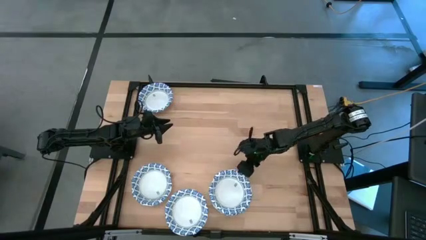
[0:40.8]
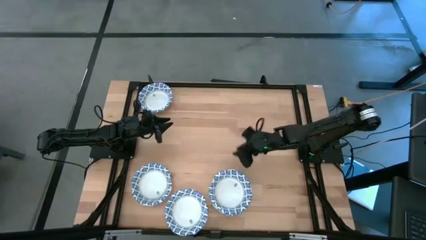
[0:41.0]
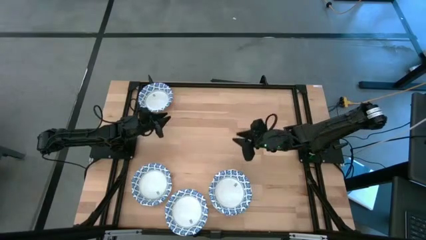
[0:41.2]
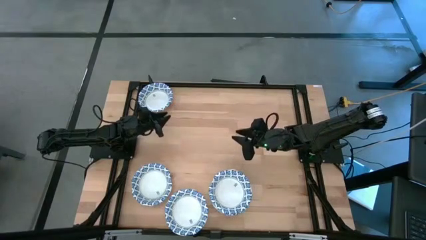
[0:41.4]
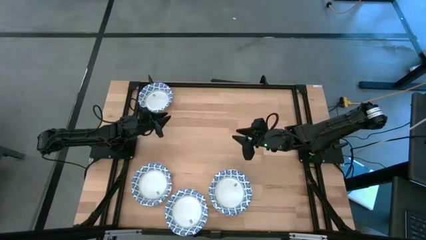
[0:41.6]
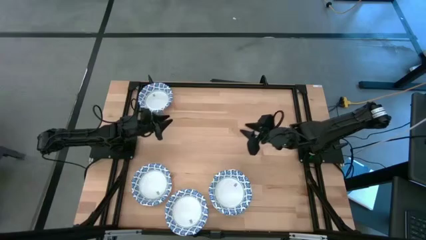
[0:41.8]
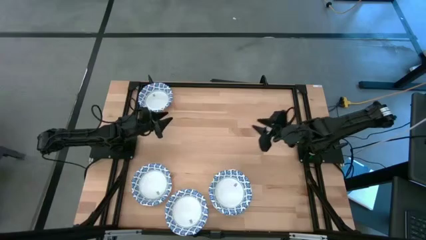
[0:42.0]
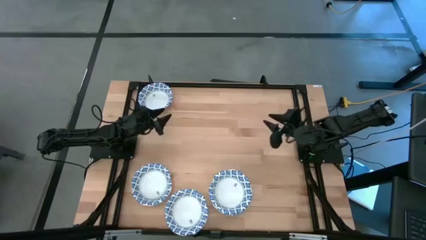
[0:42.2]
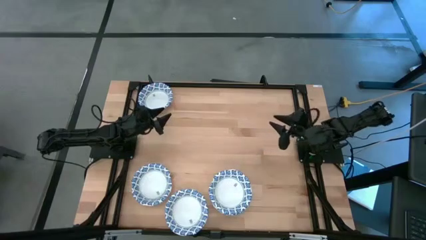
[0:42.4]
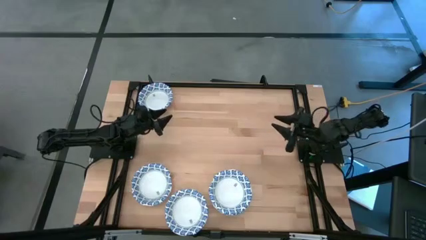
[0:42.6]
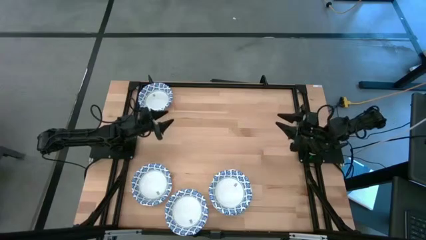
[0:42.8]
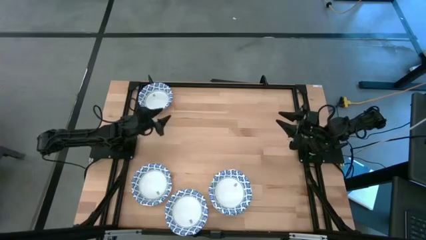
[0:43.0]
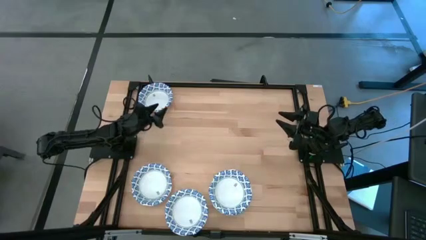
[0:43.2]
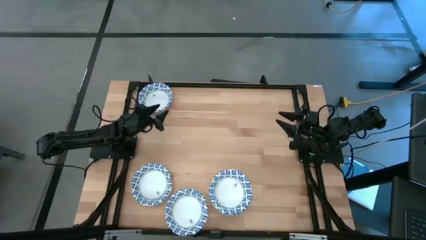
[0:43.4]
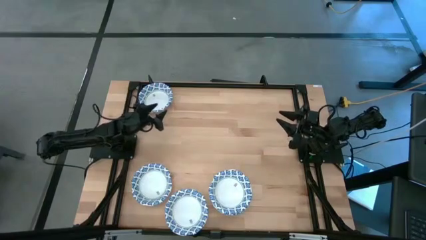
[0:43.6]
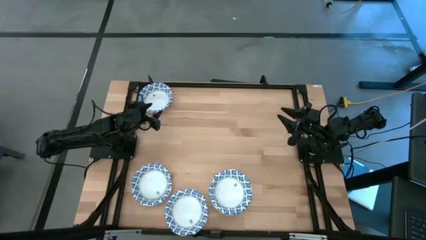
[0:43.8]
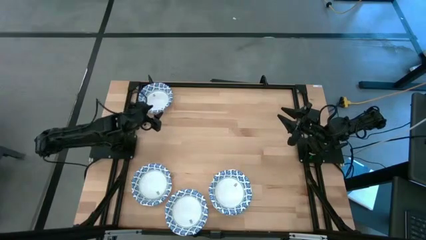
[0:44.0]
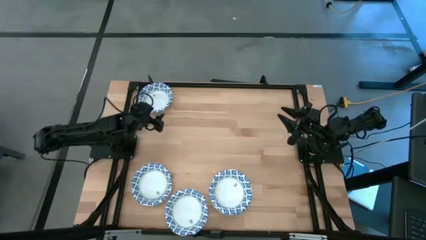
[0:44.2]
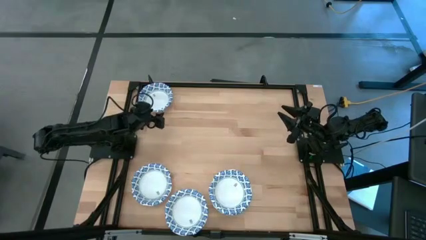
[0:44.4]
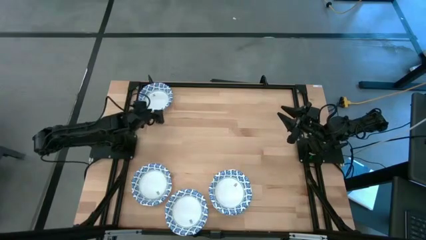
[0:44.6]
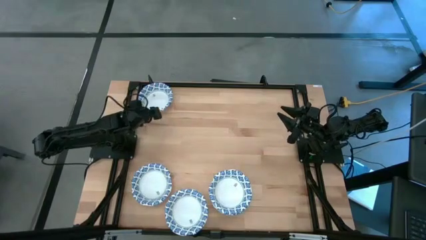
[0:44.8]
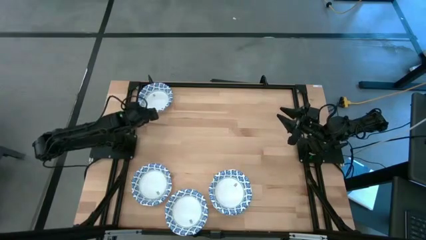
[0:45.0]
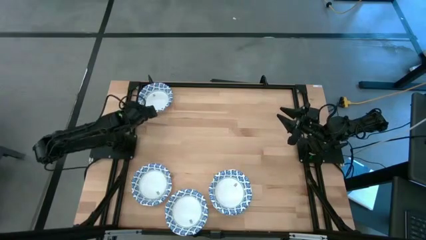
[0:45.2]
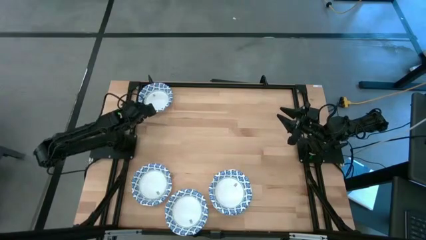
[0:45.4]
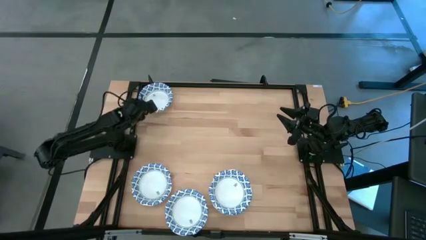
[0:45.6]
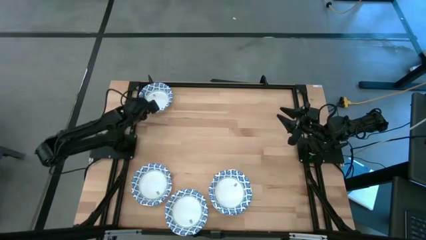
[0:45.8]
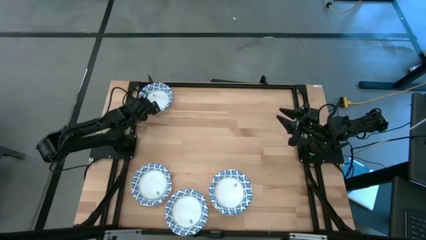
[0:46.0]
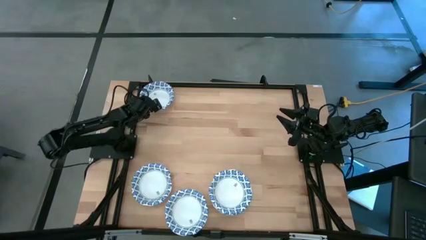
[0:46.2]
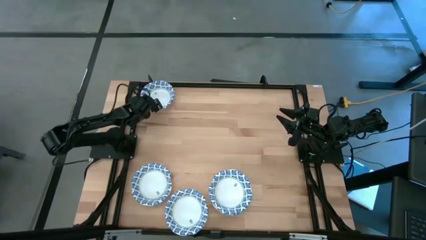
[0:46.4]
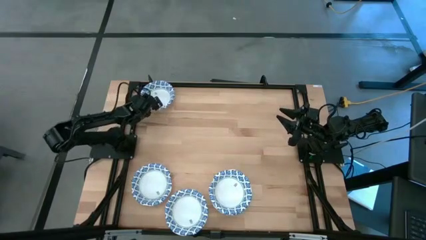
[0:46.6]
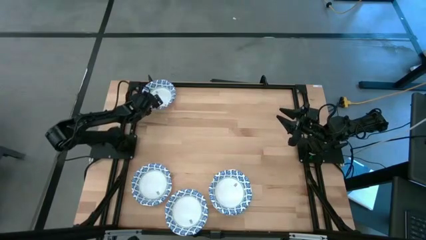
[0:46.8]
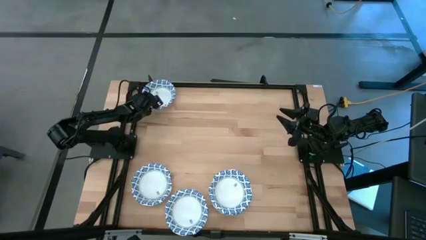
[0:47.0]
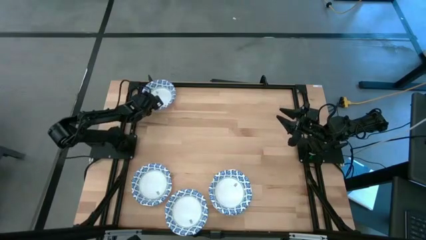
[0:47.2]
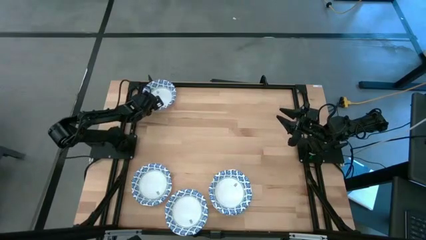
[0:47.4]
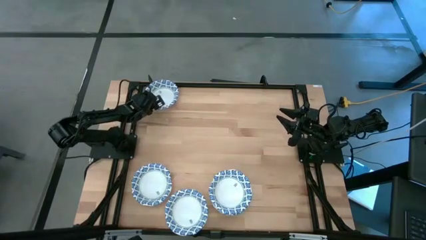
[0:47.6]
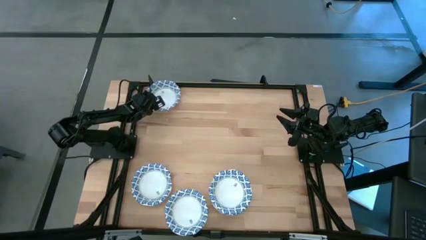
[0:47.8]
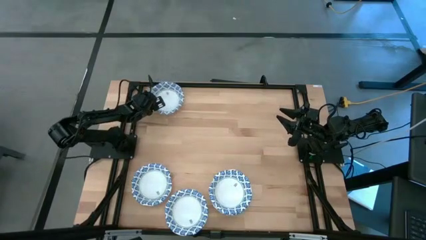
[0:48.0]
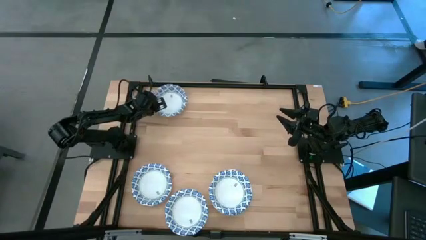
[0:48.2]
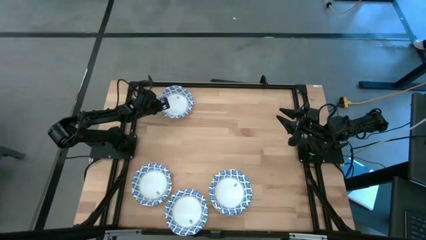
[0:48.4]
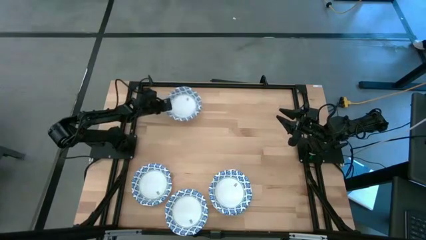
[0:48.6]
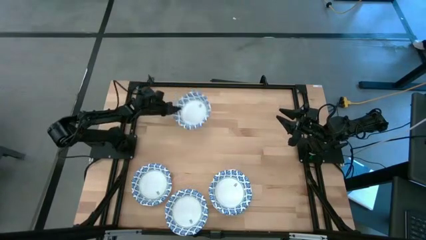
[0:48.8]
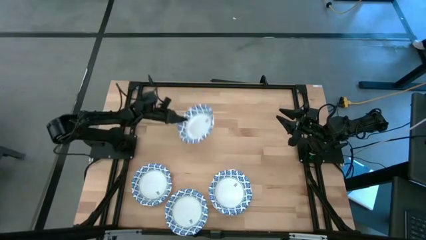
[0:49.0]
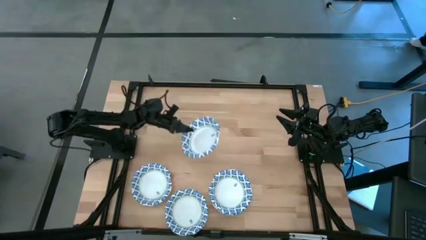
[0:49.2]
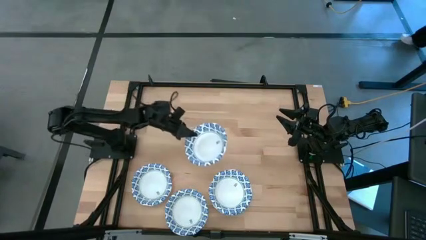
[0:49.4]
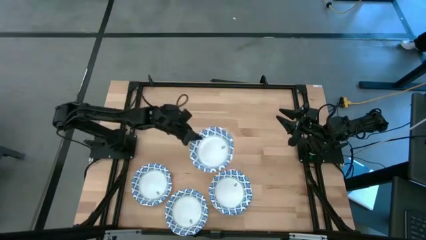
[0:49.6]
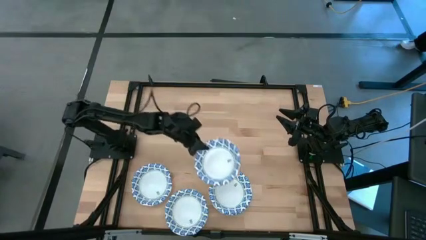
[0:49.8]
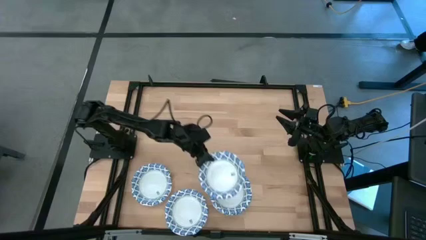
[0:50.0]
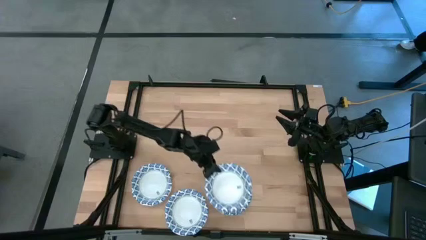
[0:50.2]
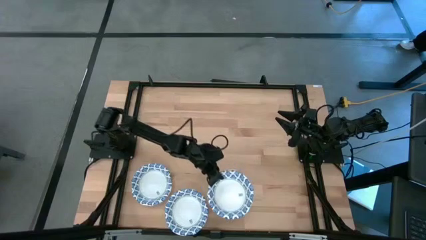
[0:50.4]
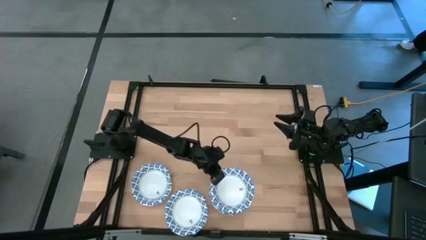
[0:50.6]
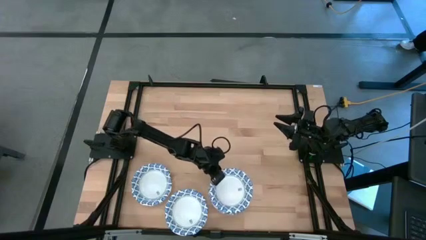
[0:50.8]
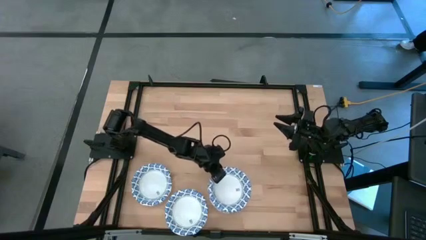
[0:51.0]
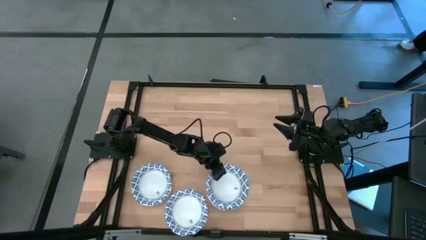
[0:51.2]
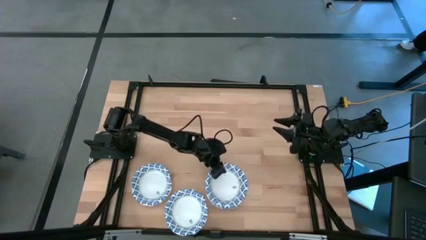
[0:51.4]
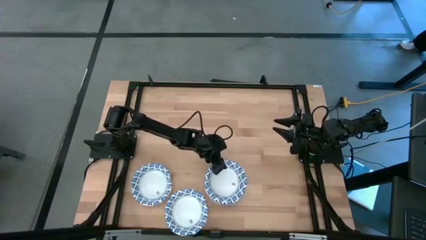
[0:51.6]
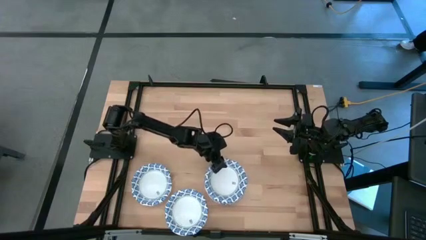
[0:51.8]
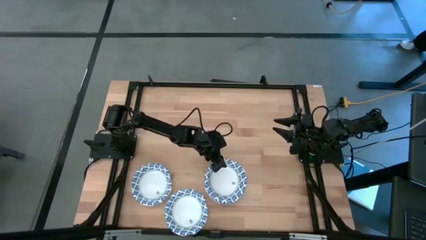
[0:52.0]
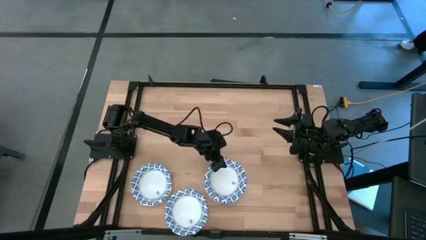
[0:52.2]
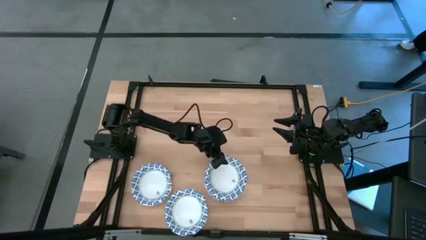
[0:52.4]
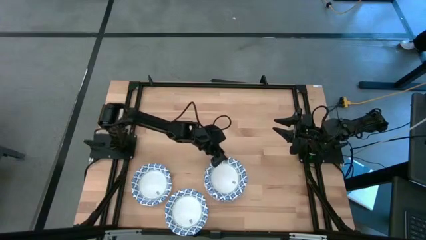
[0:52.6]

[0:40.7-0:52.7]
Task: Nest bowls inside each other
Stack the blue patterned bowl on the blue patterned bowls

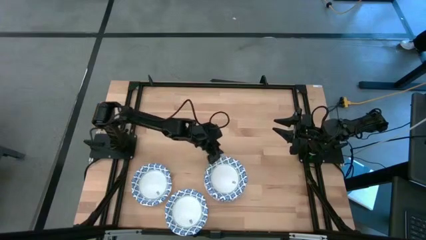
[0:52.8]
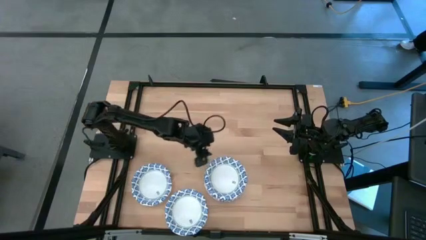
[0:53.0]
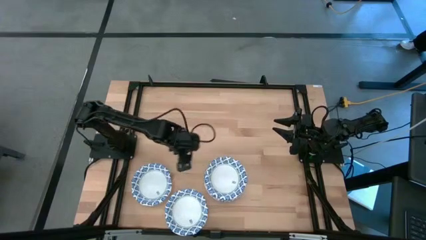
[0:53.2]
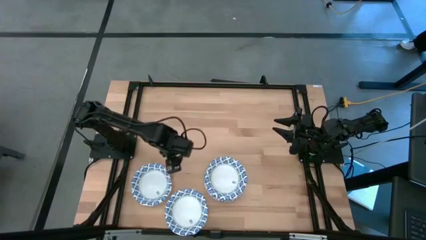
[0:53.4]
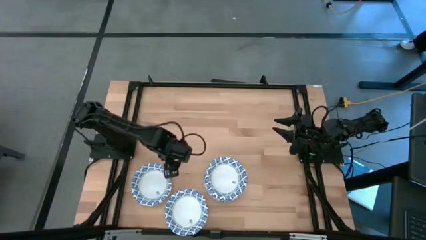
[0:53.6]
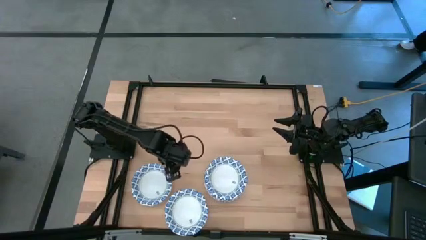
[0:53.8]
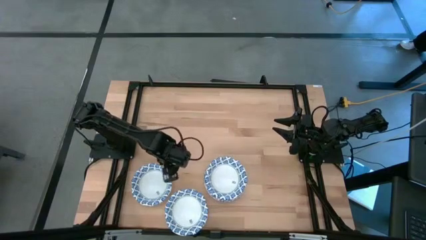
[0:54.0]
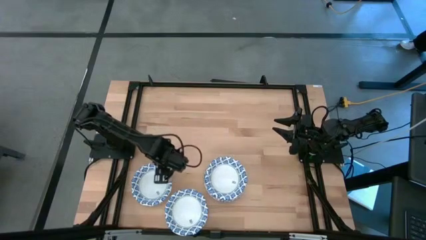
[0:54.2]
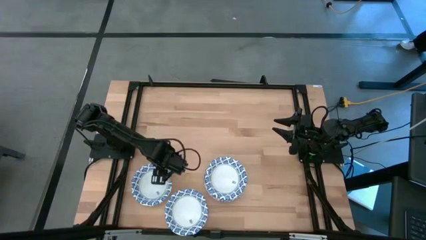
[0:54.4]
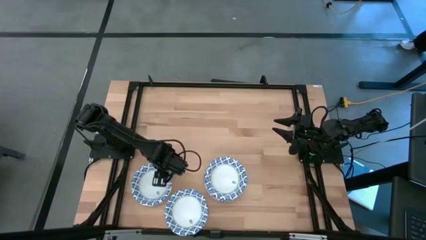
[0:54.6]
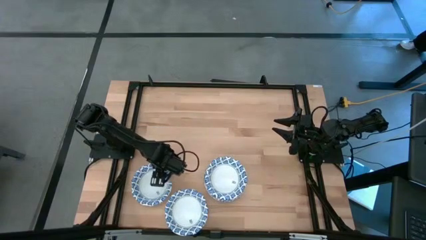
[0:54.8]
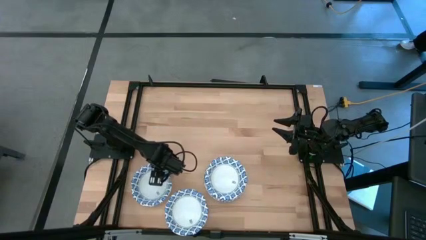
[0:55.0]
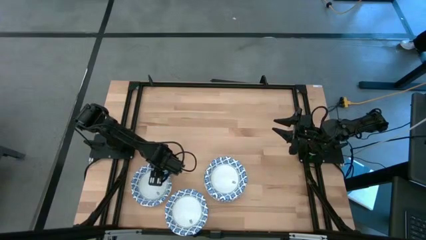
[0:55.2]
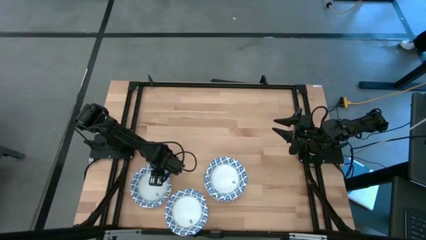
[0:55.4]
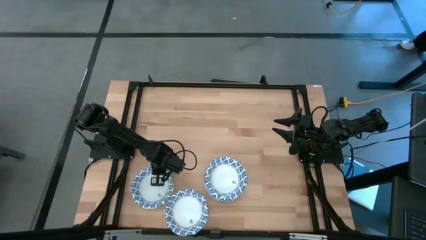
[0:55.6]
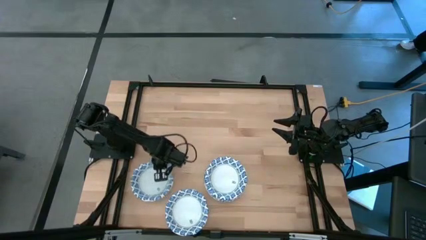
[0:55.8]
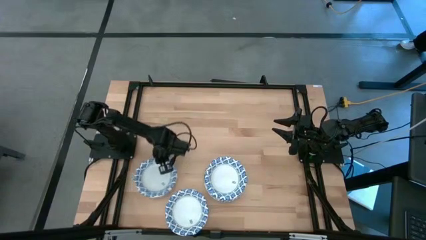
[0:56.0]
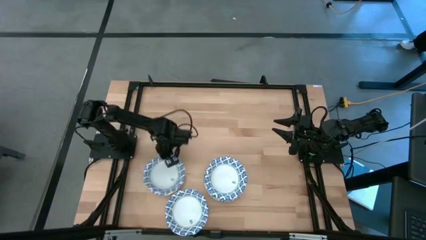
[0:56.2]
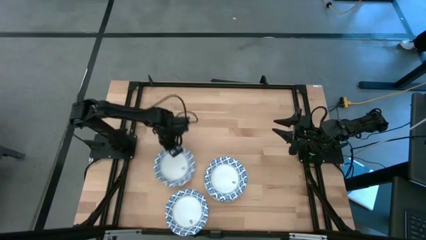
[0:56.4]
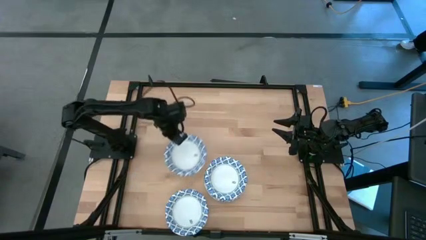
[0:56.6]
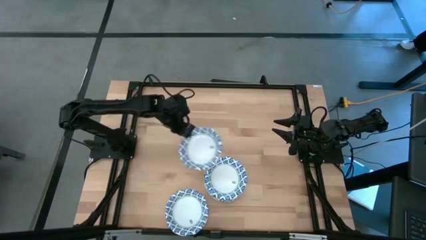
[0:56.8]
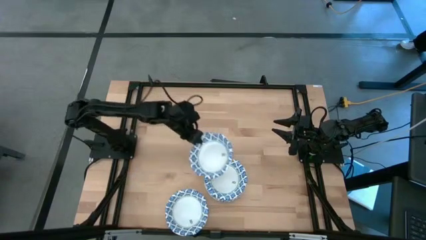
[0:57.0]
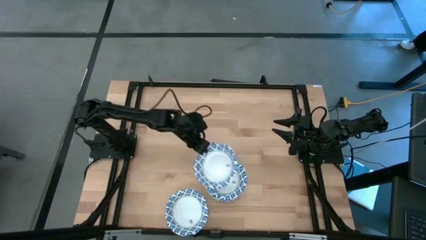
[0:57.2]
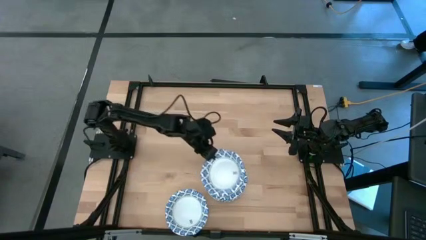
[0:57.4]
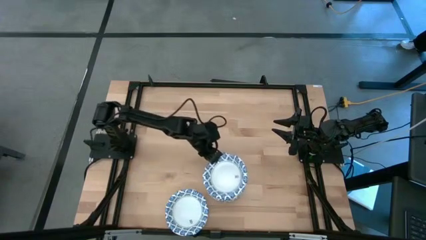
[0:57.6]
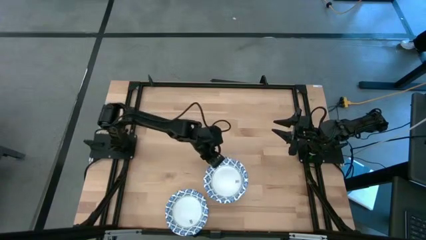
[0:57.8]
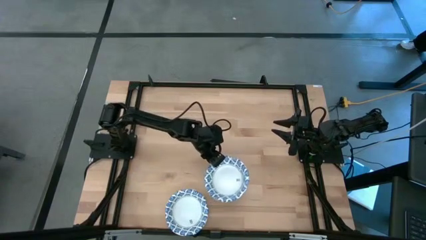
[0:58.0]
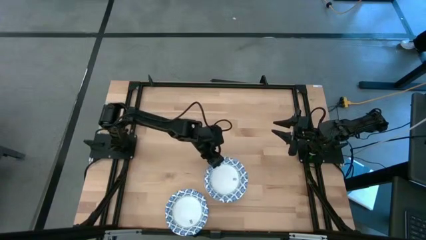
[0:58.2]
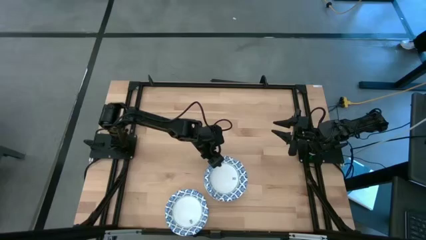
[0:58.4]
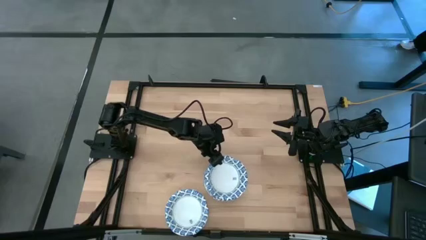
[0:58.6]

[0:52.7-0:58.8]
Stack the blue patterned bowl on the blue patterned bowls
